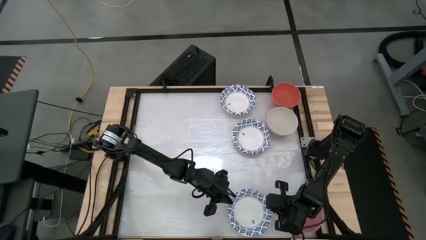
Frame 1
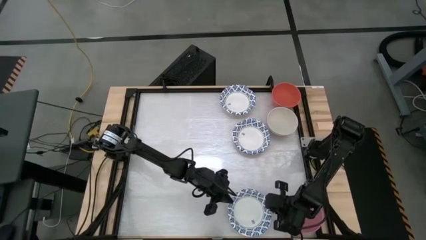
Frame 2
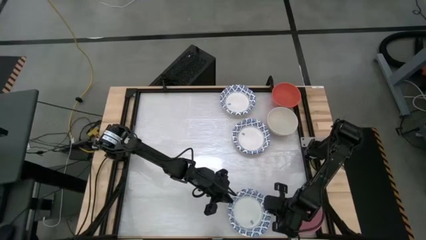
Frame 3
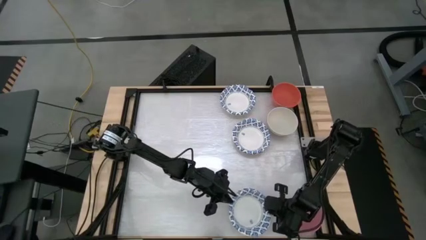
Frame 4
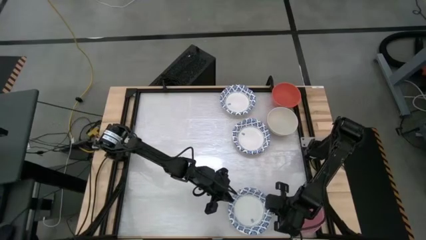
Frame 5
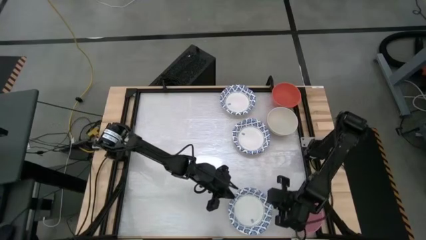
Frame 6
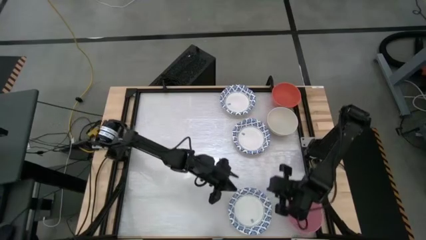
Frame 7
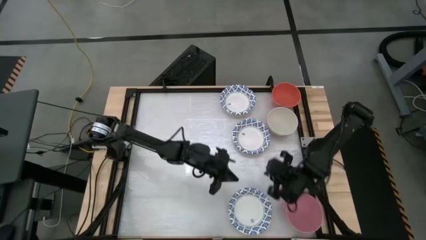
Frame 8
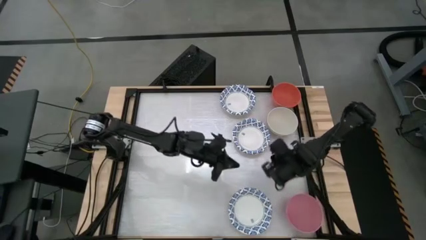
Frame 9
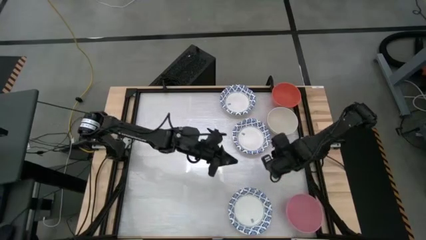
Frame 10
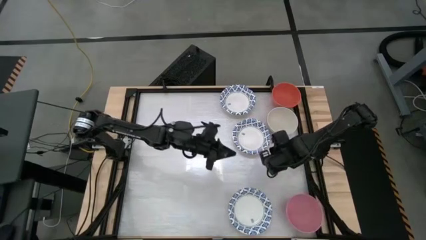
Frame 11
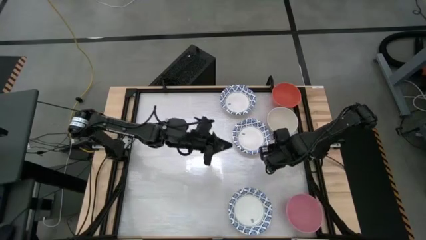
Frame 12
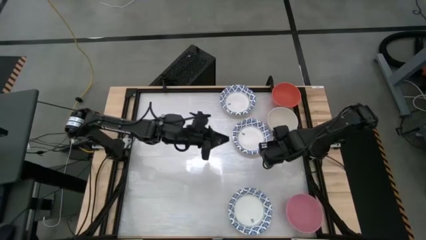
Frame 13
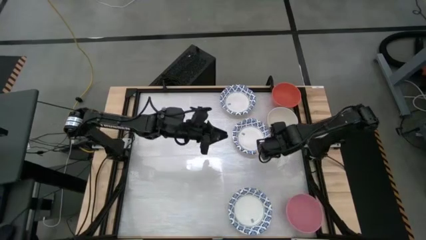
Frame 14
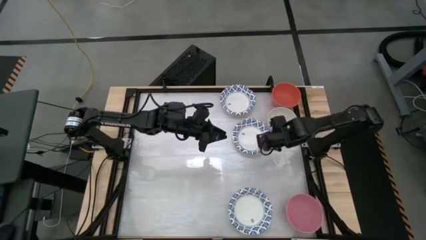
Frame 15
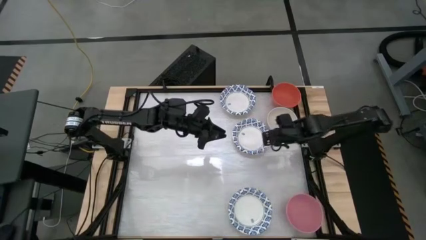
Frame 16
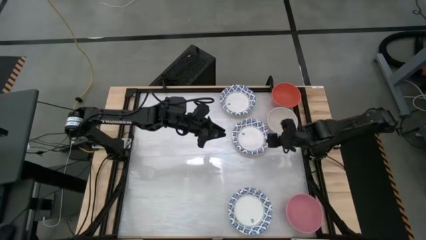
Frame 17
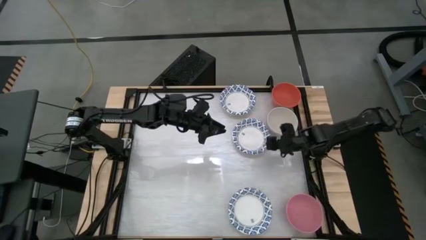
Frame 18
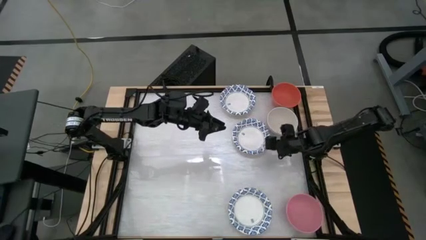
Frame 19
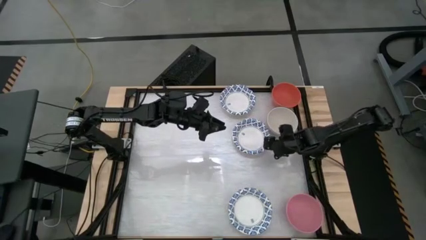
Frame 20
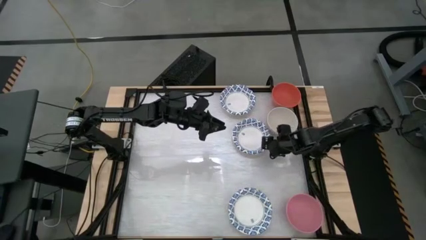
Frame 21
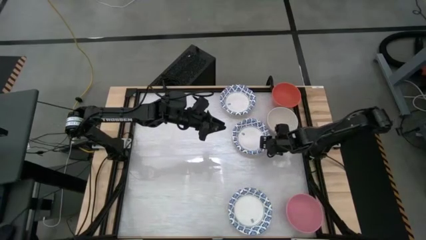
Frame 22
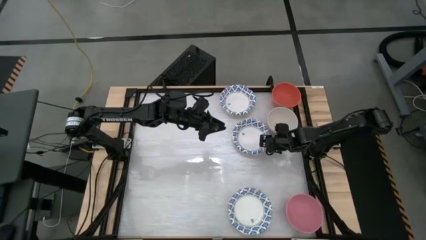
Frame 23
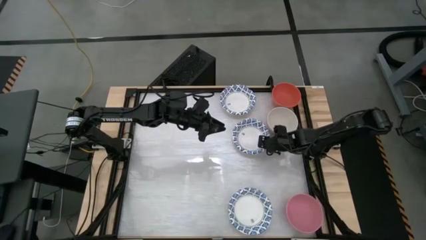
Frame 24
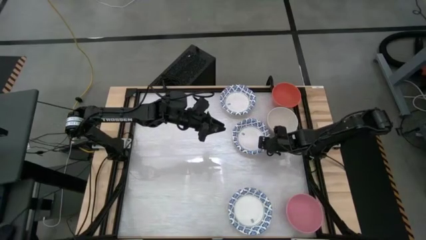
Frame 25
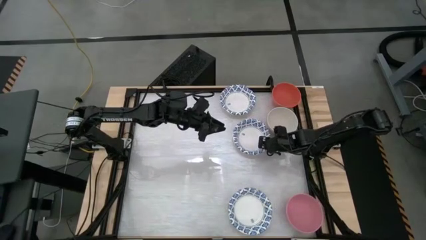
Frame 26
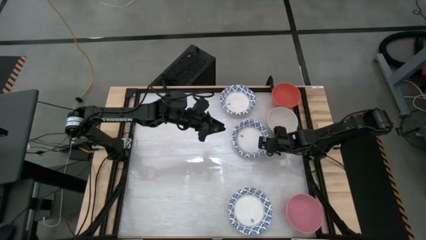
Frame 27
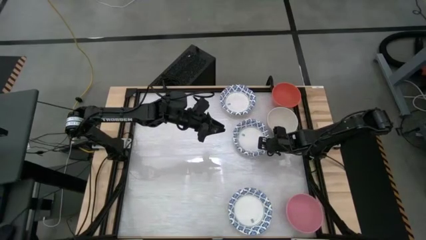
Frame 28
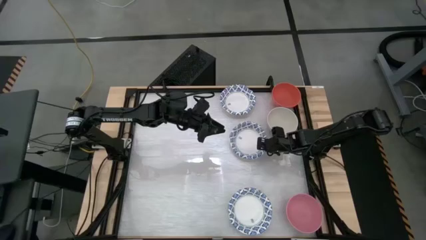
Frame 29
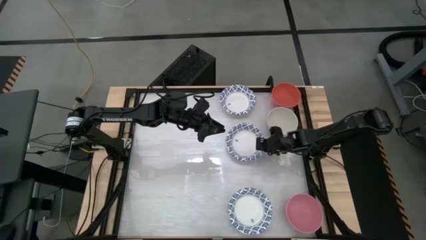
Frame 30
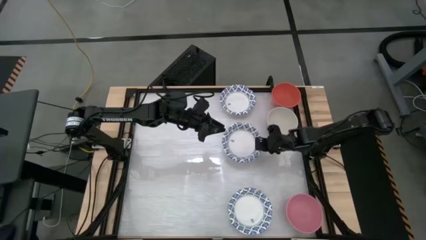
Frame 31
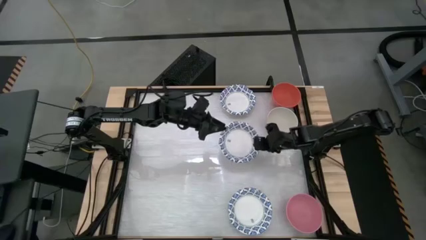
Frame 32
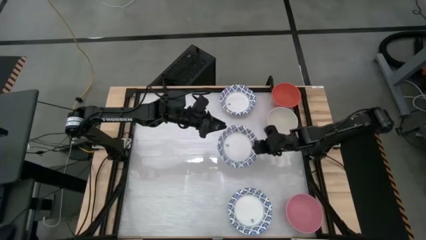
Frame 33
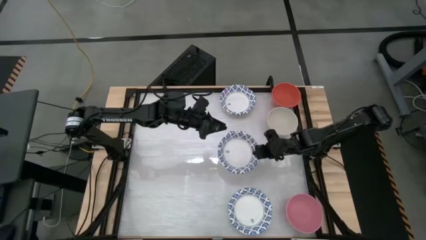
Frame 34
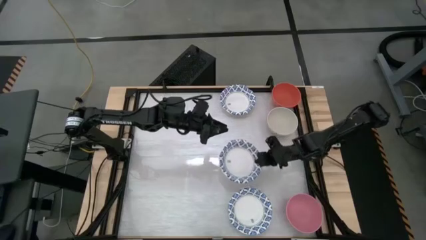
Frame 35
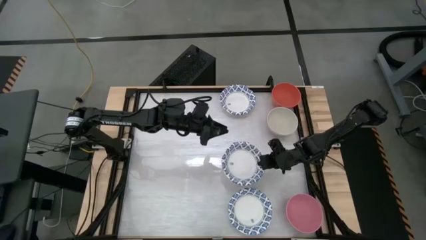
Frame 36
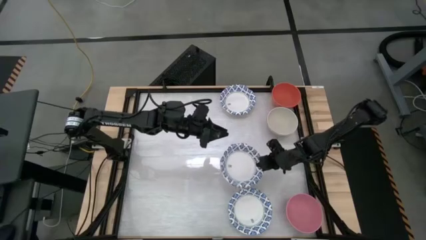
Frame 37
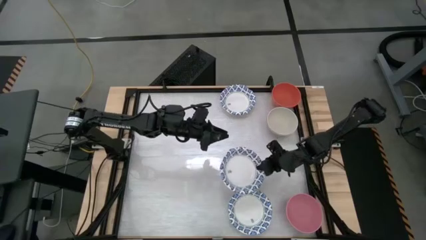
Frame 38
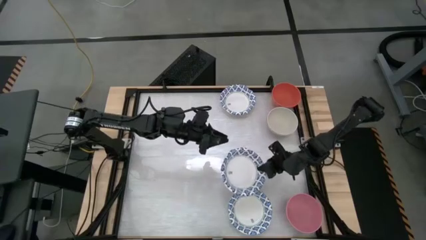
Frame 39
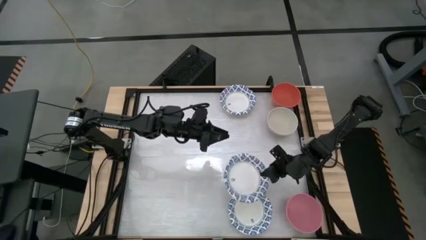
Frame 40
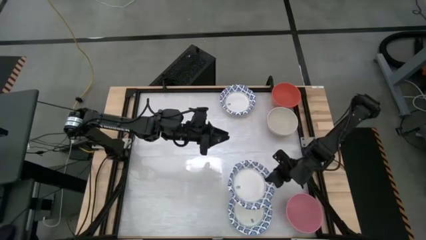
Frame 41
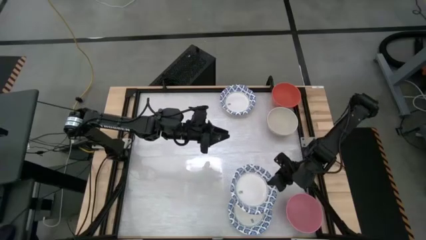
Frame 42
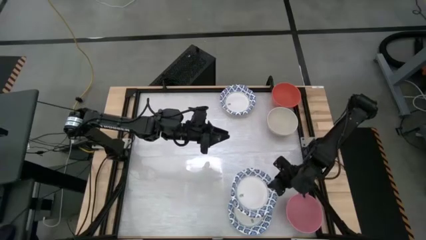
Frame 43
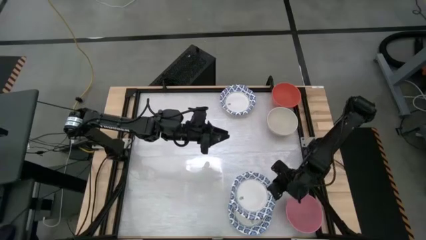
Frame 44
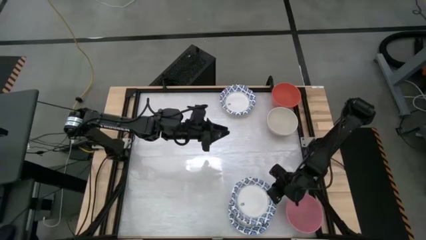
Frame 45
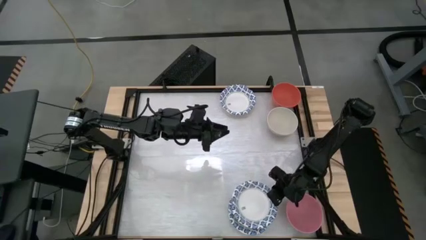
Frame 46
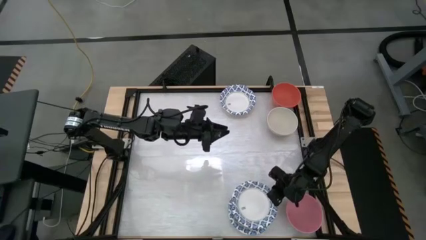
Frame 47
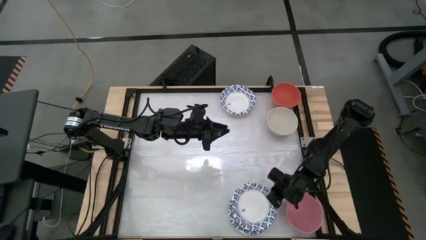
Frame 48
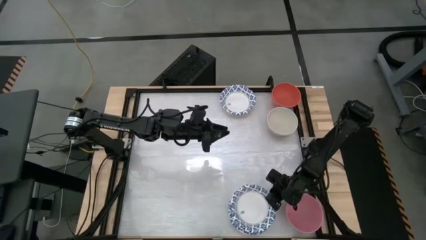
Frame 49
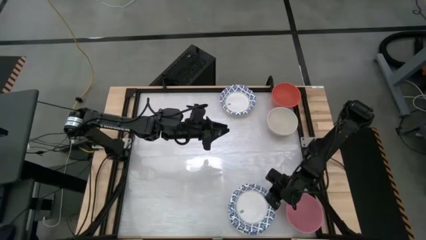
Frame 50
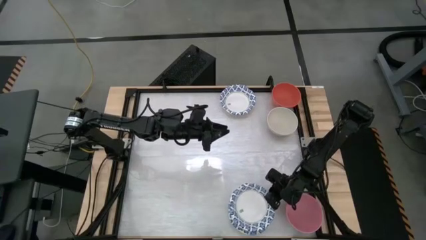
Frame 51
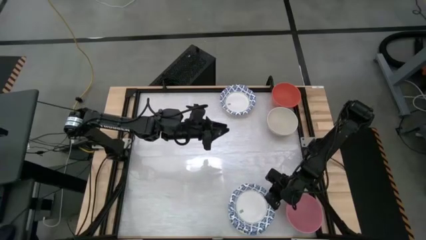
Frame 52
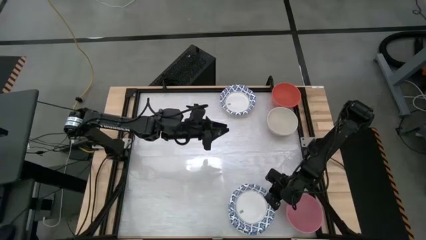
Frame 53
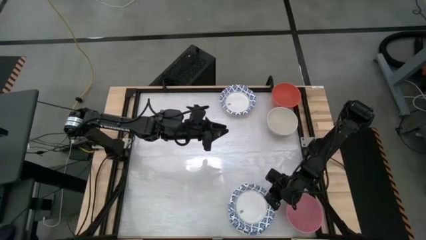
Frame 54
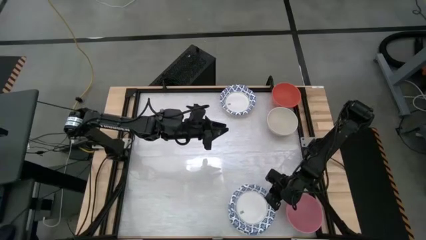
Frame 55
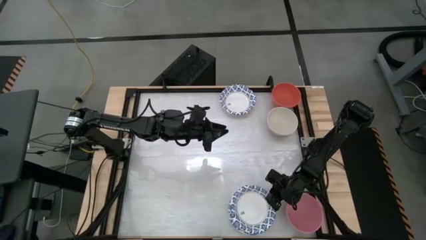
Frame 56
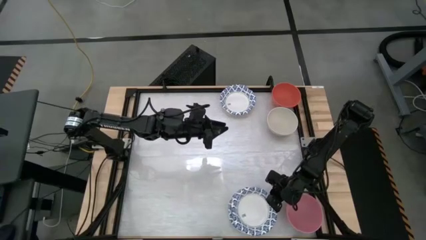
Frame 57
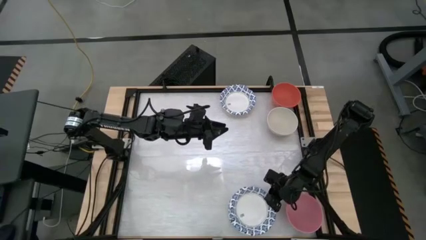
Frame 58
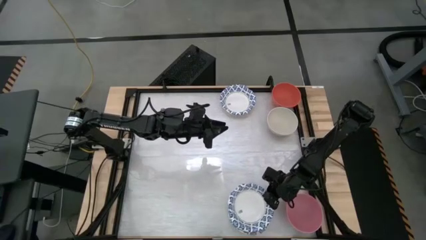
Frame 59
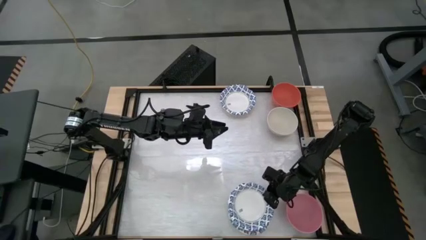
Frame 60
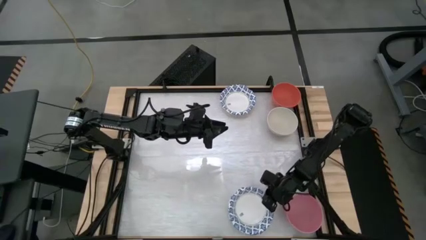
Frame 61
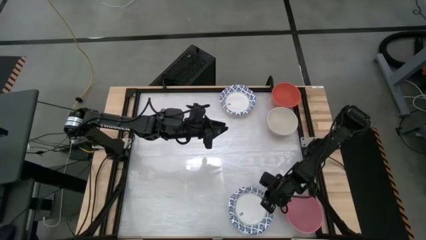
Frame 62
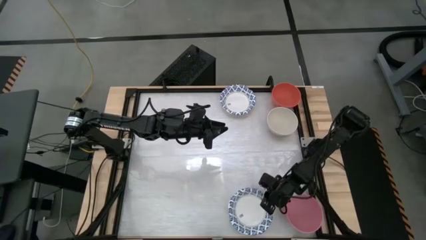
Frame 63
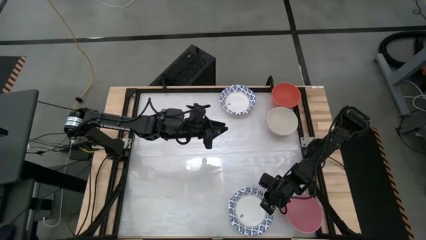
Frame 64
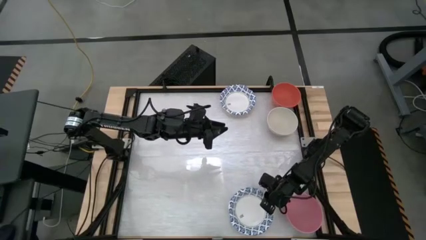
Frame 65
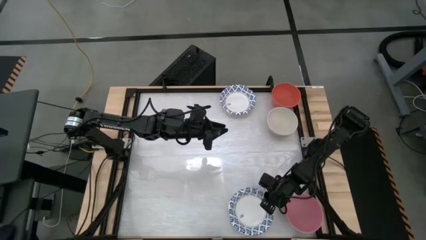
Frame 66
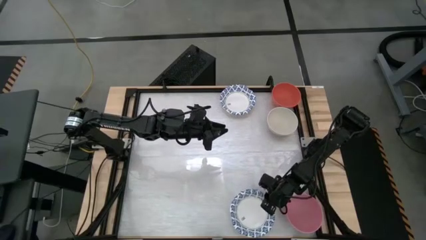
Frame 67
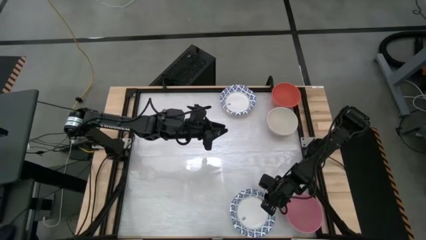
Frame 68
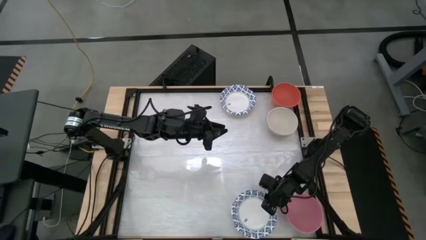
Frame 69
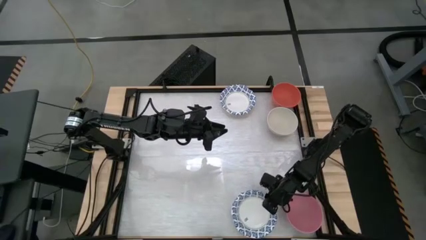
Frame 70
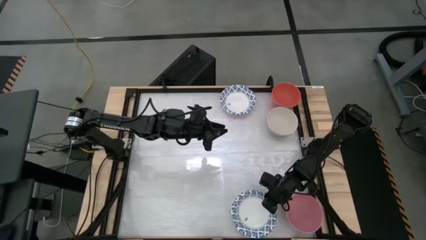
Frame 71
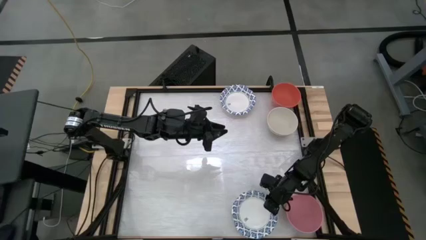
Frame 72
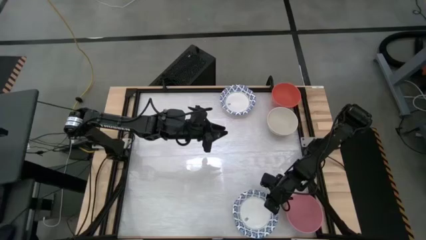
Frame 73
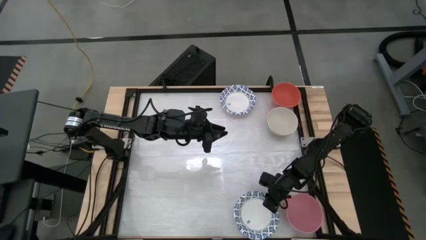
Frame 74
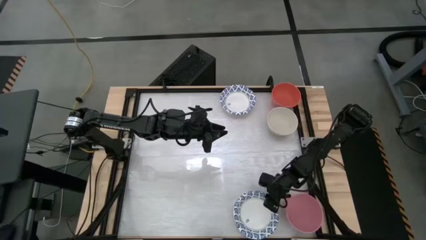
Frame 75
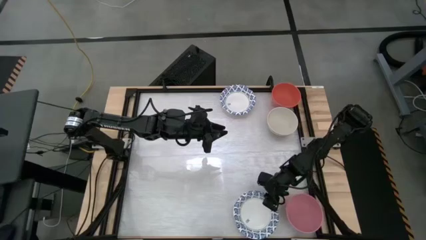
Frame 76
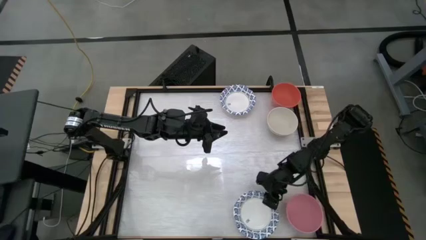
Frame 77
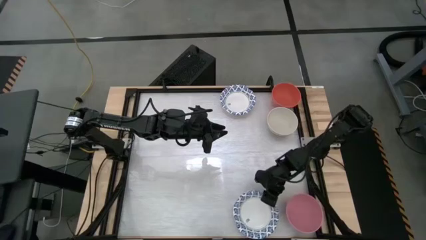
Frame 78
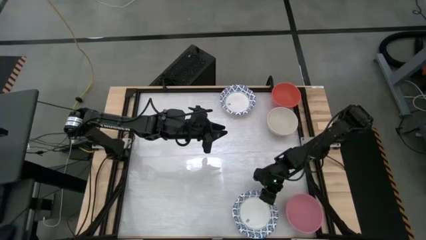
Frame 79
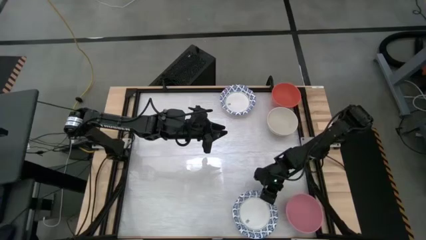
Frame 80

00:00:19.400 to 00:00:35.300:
Stack the bottom right white blue patterned bowl on top of the bottom white blue patterned bowls
